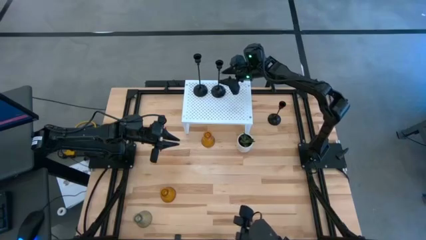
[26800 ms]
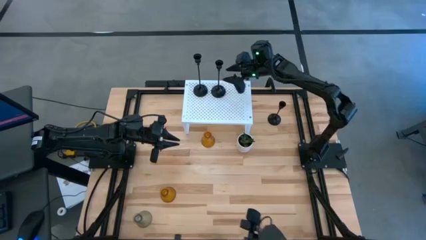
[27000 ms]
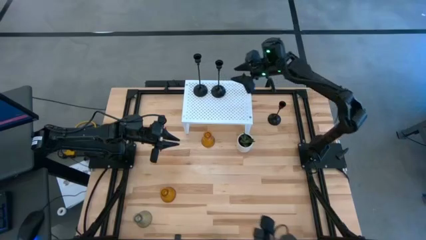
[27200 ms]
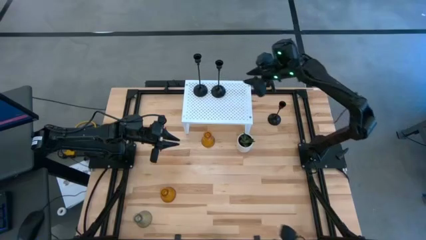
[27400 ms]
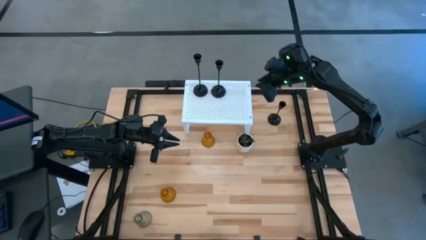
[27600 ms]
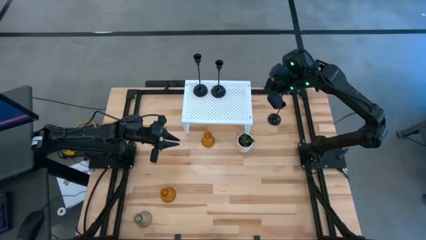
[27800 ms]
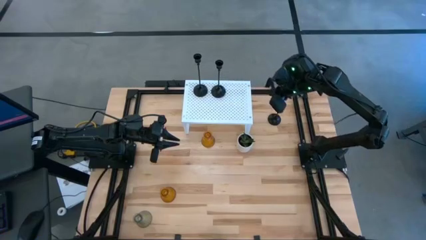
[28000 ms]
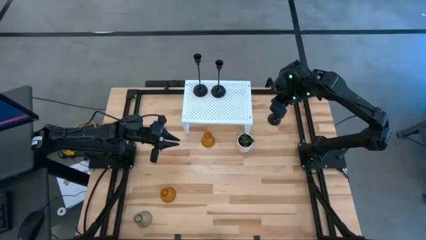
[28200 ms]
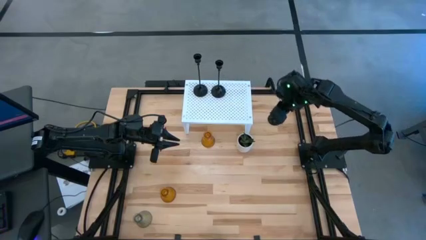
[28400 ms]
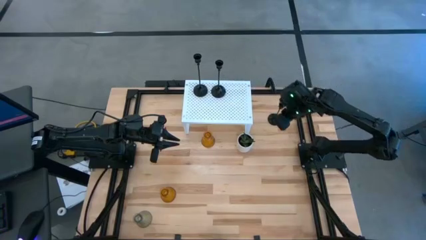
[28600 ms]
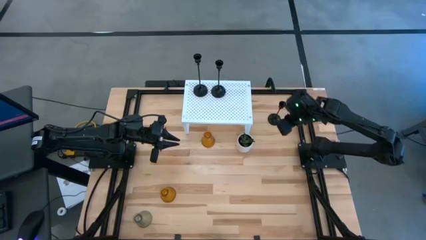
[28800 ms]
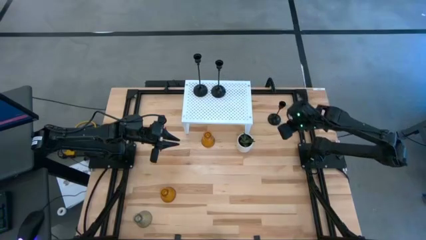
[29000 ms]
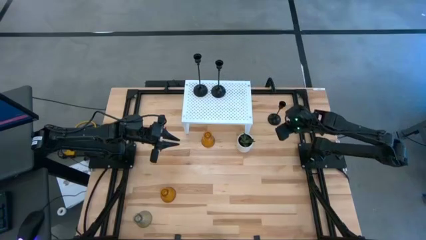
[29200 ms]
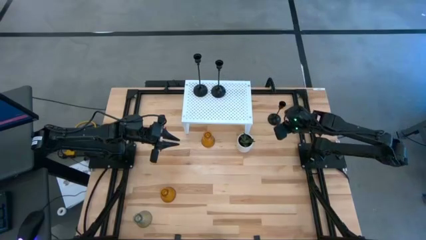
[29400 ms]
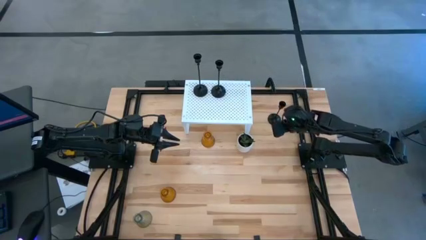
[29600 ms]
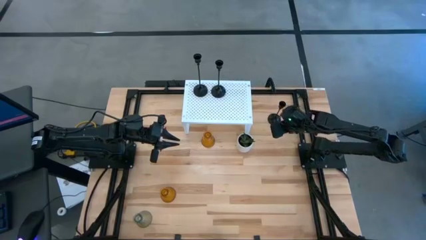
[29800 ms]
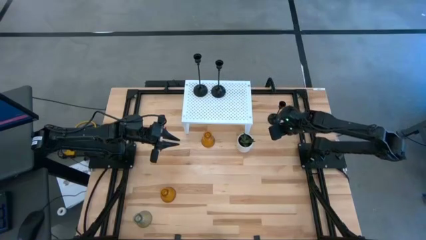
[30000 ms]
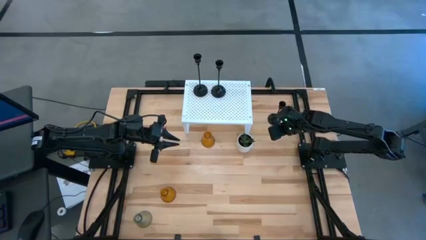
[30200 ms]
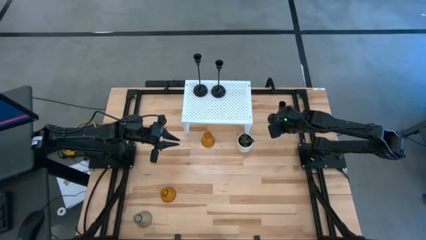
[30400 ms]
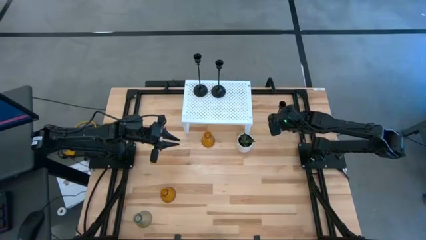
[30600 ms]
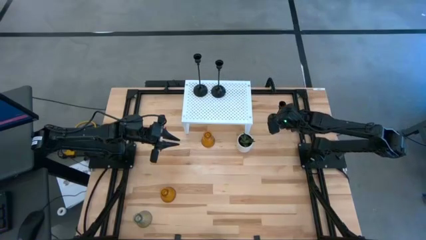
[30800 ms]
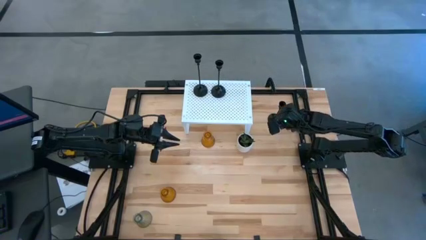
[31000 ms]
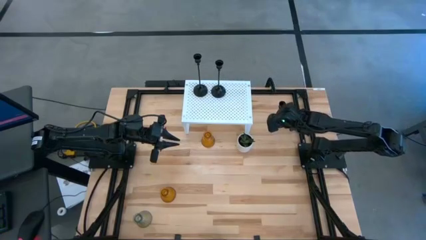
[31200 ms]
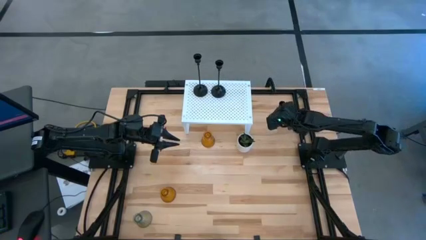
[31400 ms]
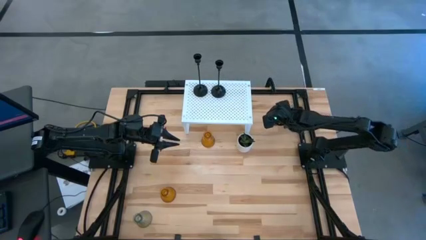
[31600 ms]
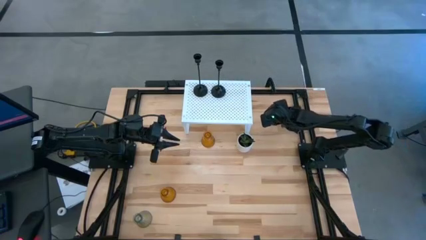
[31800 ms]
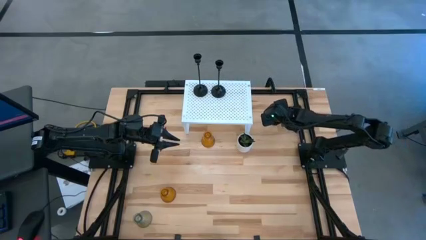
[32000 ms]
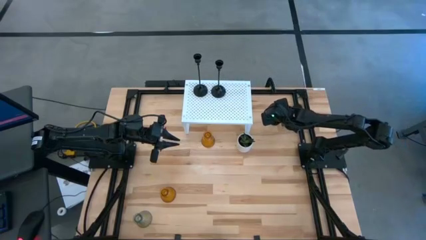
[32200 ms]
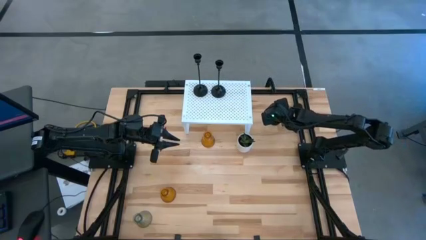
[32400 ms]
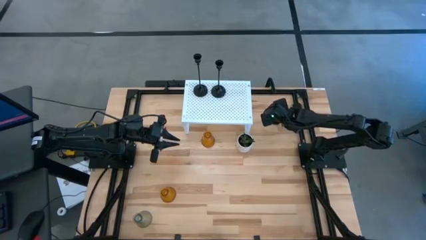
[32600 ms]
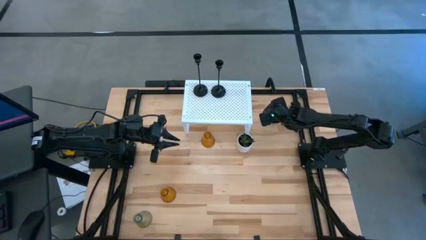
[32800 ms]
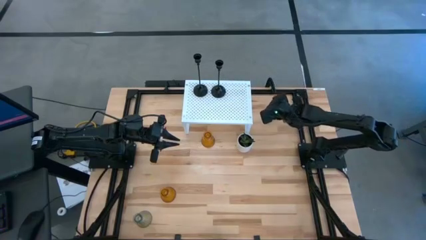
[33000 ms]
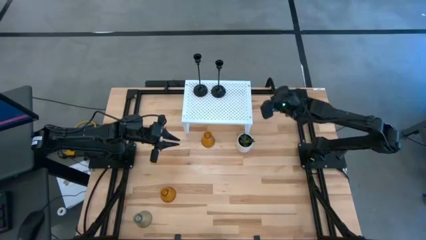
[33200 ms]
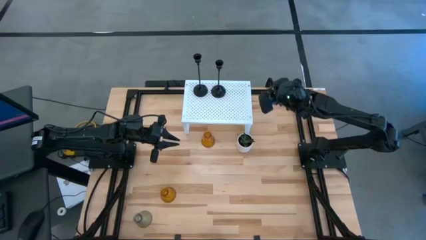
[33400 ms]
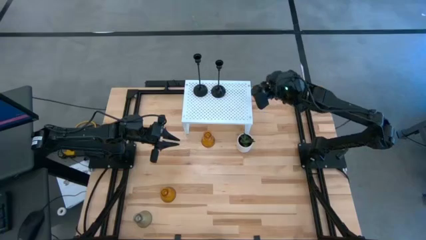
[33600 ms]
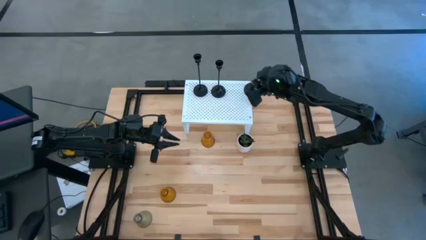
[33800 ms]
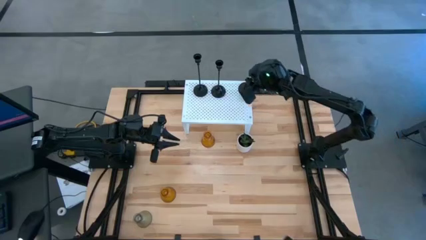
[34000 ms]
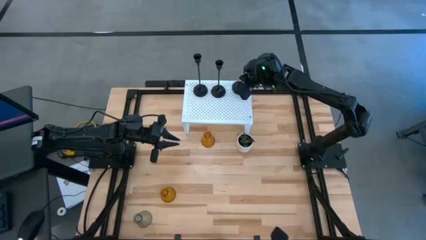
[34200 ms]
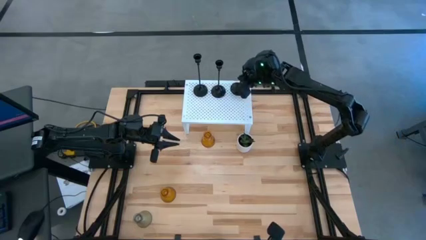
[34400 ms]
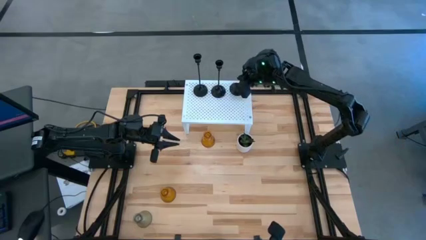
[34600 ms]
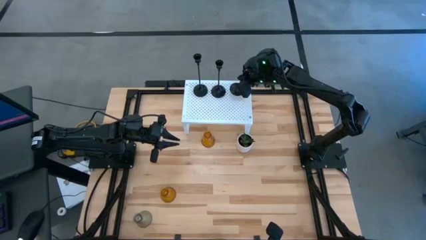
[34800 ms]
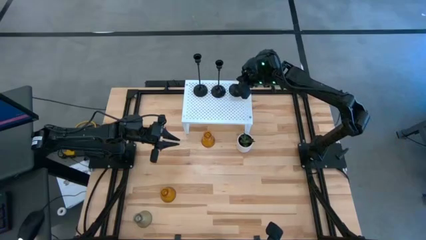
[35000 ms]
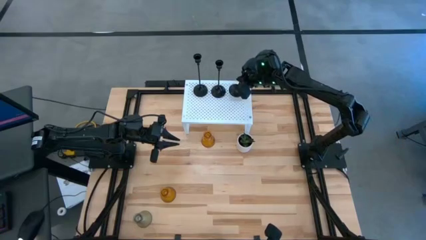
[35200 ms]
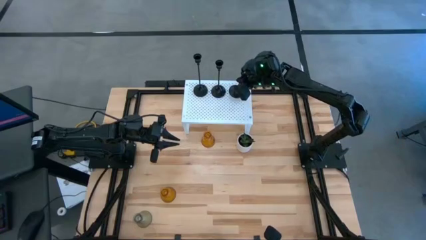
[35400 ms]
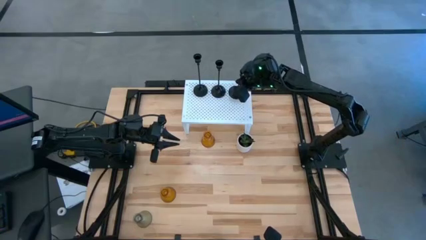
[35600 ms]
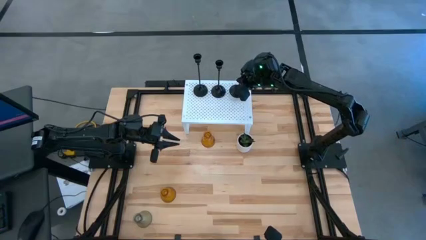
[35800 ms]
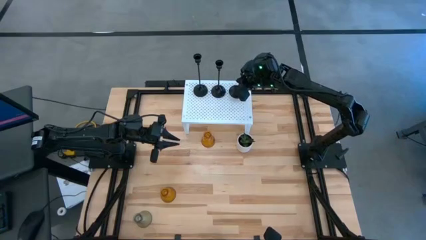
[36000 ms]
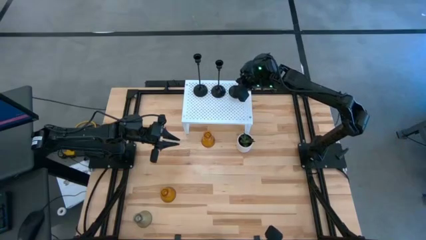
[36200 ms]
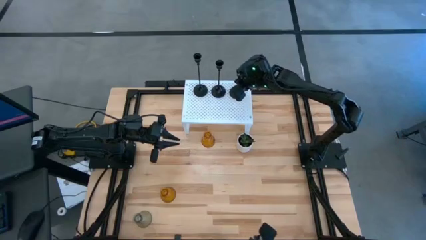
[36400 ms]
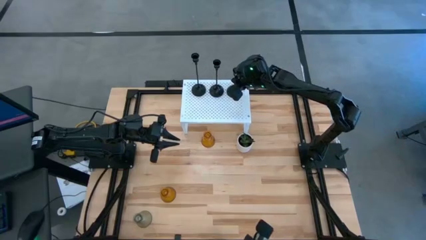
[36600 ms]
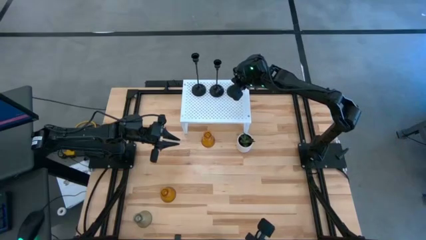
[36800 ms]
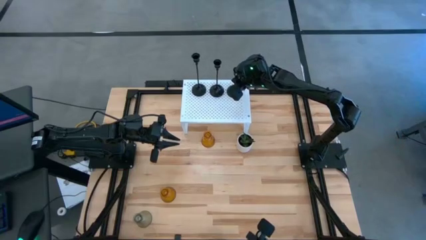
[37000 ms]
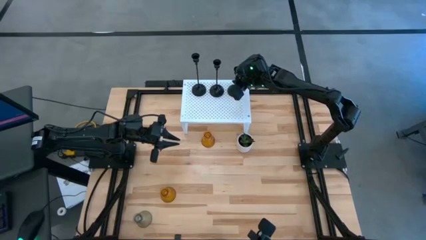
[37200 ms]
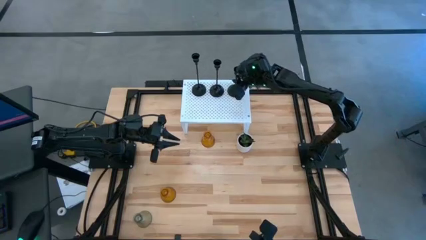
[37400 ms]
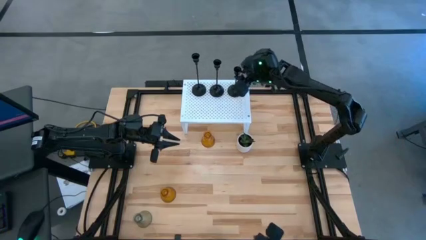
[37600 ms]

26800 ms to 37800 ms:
Task: Pick & Place candle stick holders
Put the black candle holder on the shelf

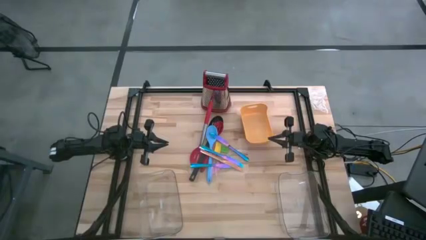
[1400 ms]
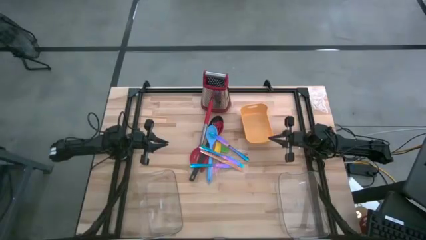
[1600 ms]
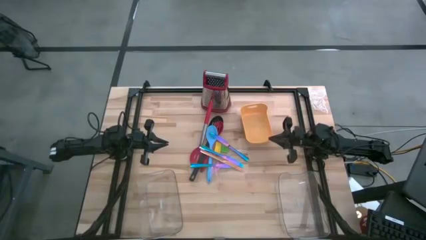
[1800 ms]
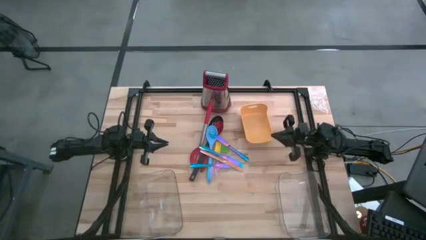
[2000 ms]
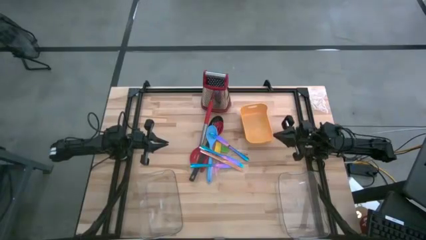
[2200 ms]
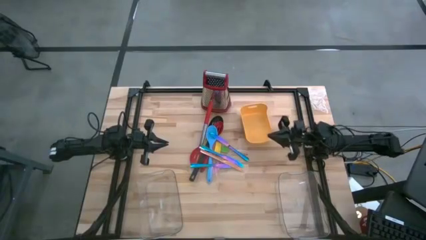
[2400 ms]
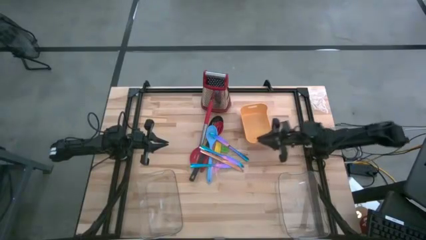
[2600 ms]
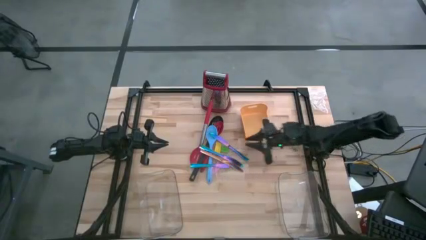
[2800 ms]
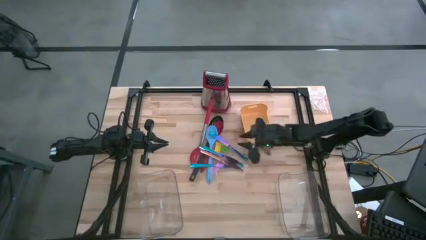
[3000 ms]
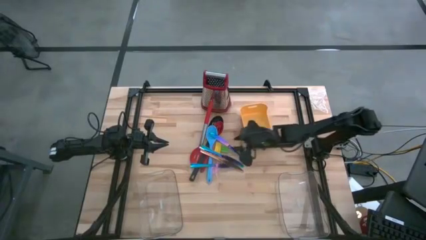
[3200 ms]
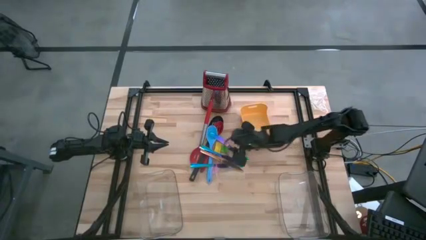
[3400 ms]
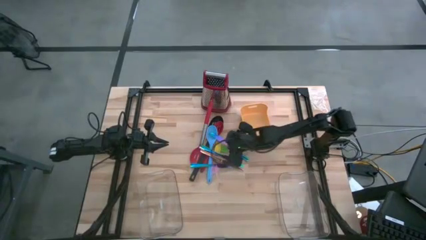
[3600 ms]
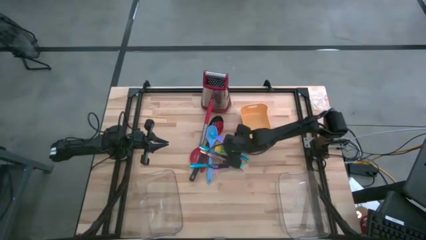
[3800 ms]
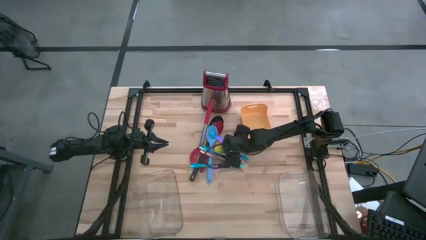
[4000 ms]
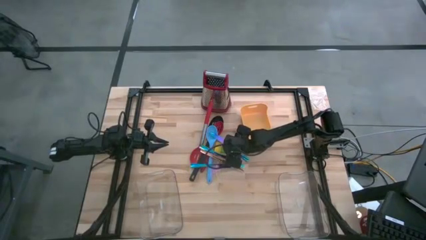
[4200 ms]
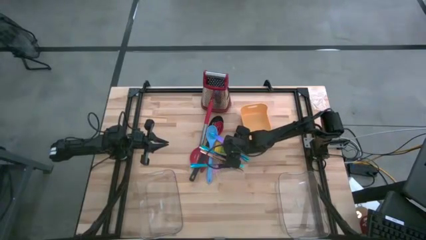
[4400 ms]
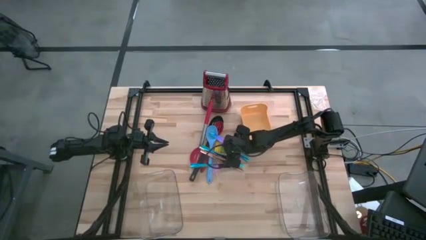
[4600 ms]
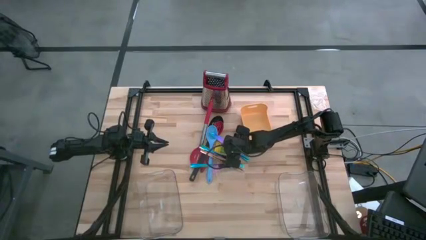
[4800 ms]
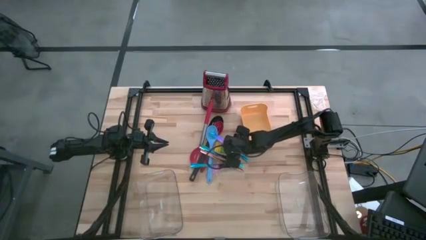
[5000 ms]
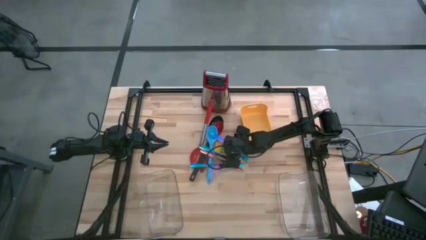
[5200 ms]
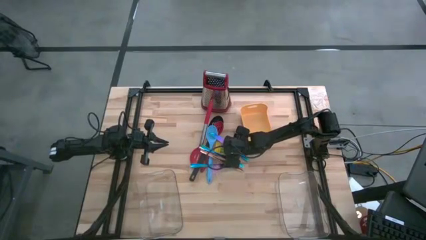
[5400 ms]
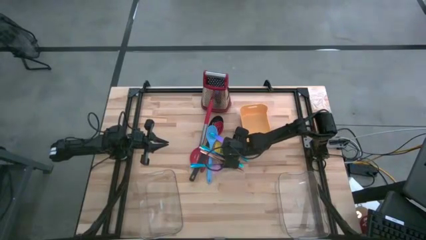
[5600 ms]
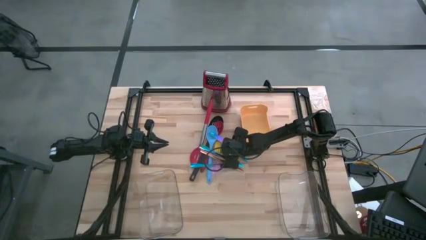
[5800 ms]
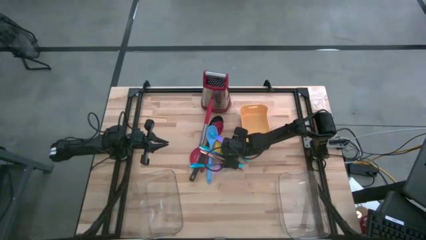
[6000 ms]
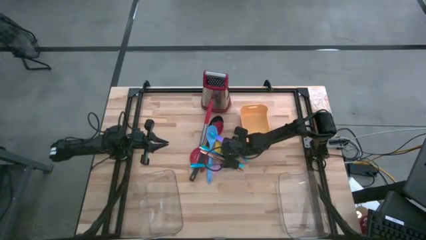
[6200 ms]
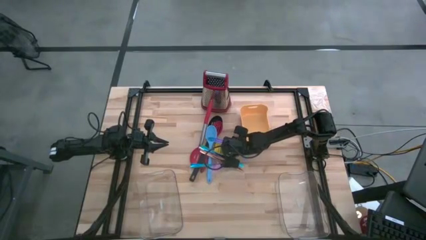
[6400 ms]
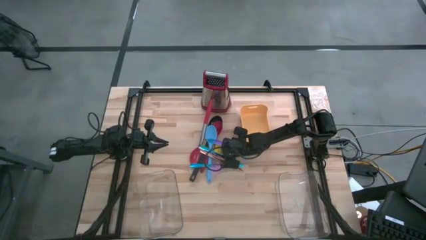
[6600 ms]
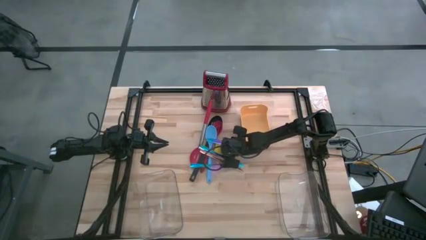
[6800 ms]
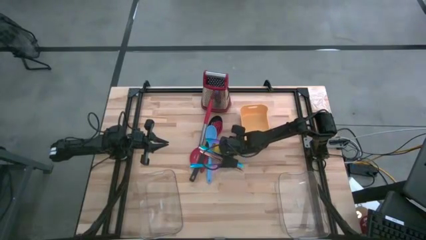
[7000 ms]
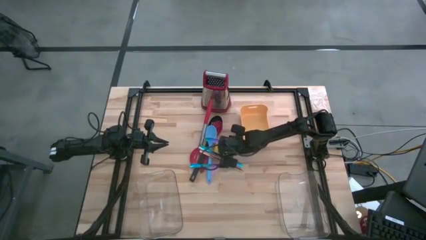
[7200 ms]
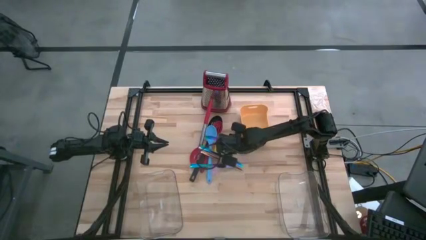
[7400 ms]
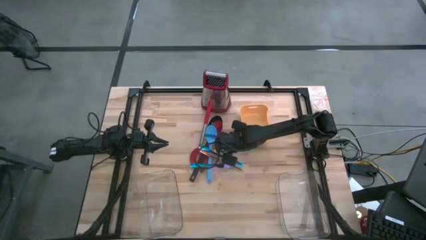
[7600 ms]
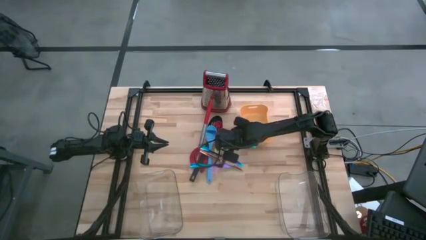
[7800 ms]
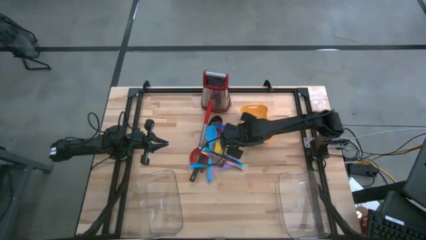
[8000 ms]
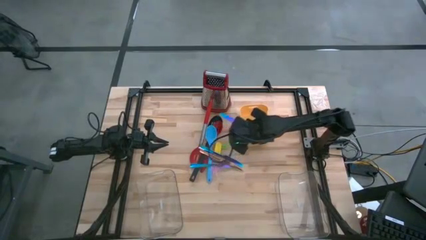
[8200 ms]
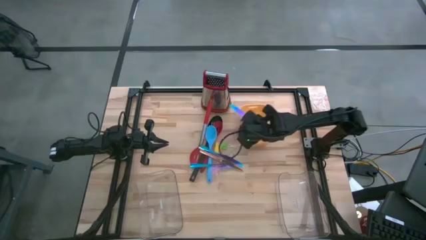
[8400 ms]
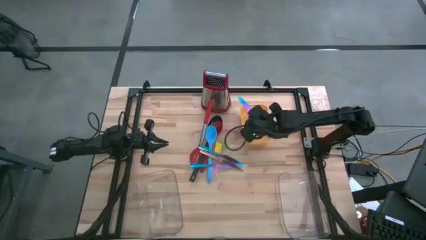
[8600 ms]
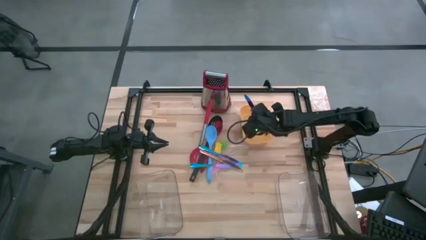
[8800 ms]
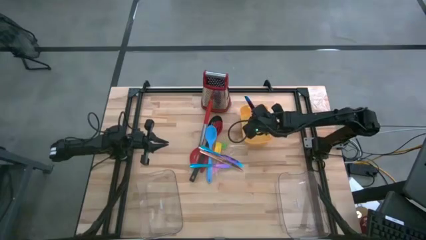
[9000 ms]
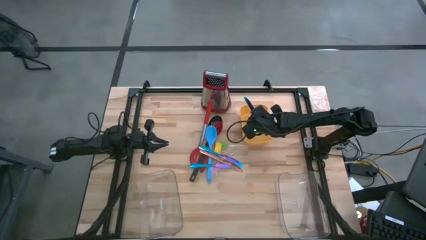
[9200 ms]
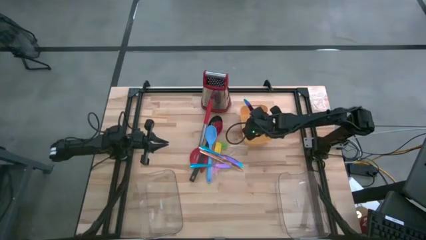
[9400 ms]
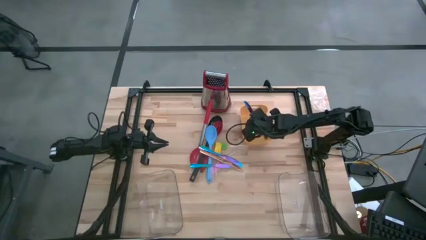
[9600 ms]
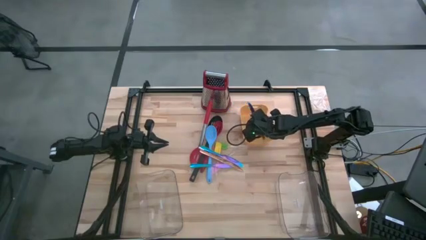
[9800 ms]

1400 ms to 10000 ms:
Task: Pick & Place Kitchen Items
Put the blue table knife into the yellow bin
